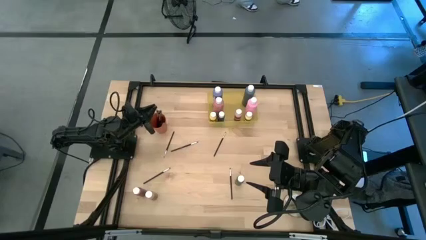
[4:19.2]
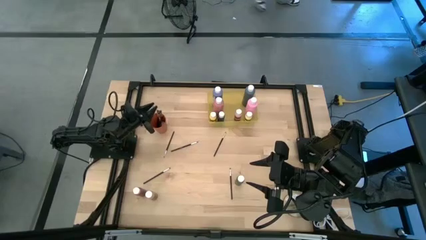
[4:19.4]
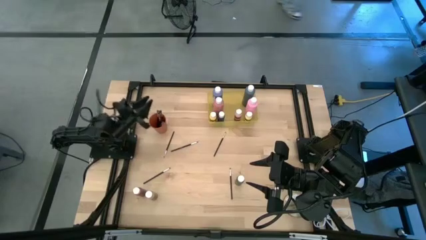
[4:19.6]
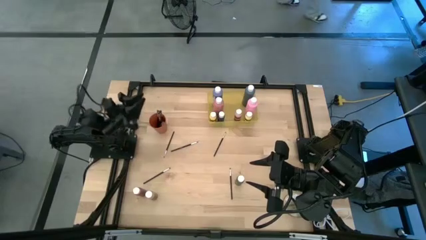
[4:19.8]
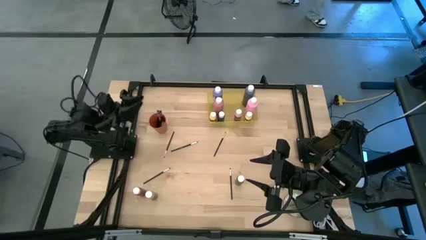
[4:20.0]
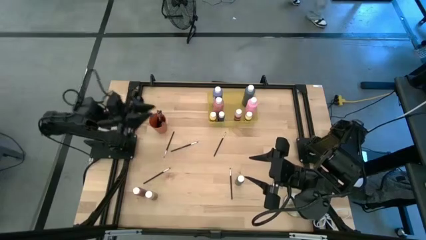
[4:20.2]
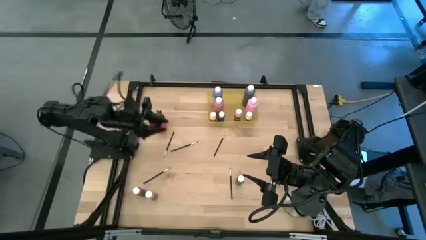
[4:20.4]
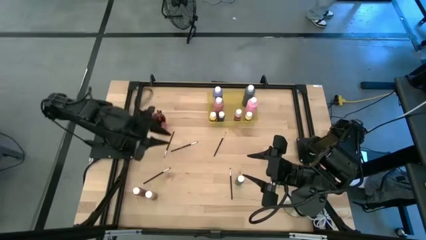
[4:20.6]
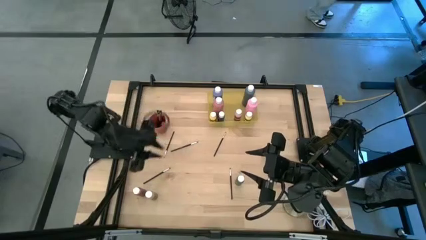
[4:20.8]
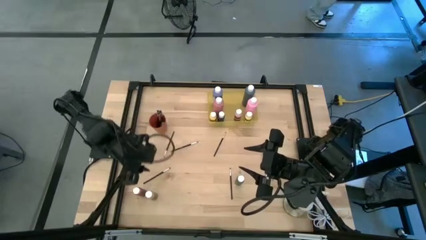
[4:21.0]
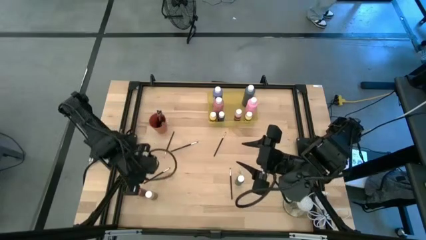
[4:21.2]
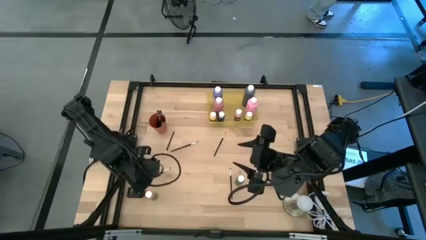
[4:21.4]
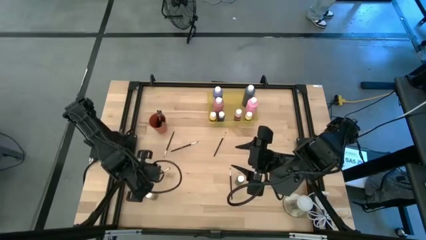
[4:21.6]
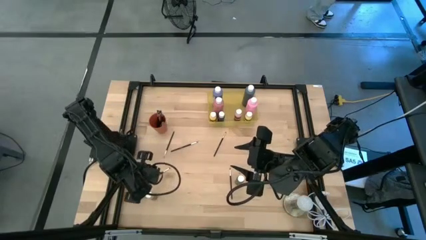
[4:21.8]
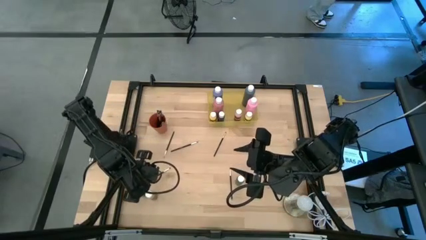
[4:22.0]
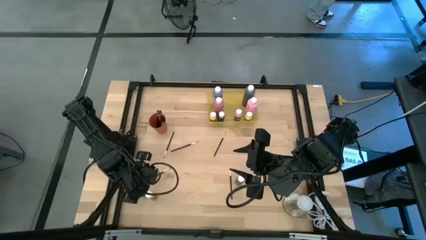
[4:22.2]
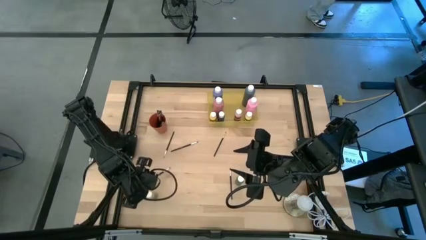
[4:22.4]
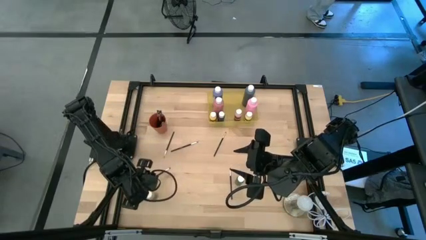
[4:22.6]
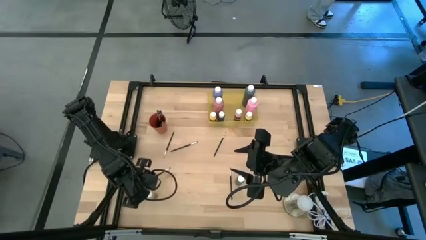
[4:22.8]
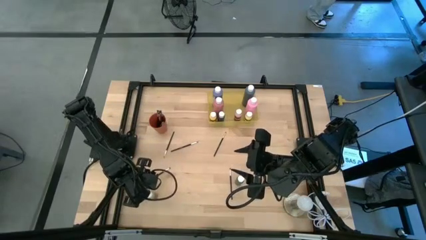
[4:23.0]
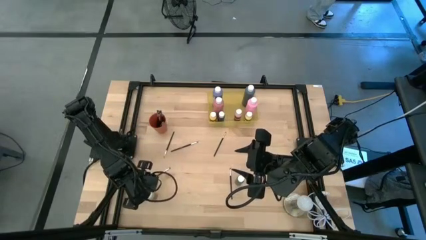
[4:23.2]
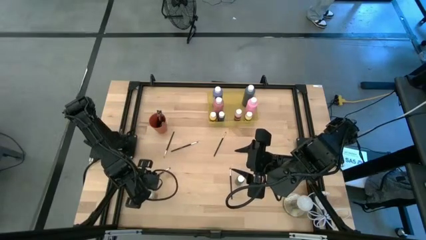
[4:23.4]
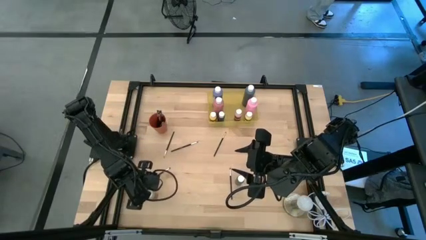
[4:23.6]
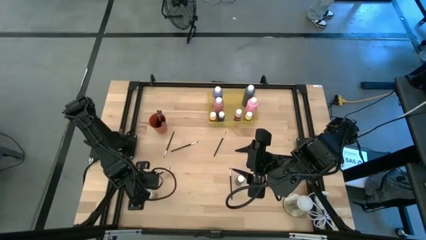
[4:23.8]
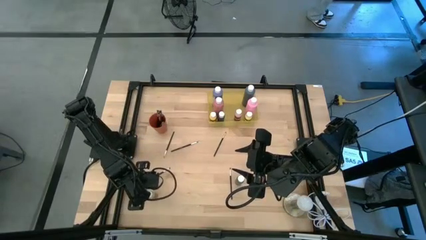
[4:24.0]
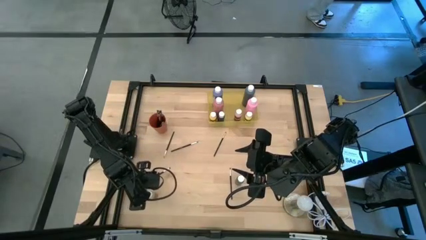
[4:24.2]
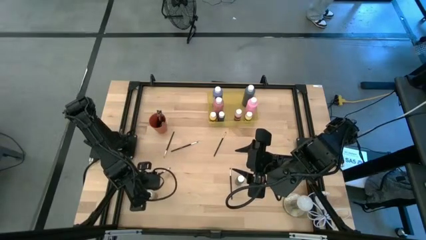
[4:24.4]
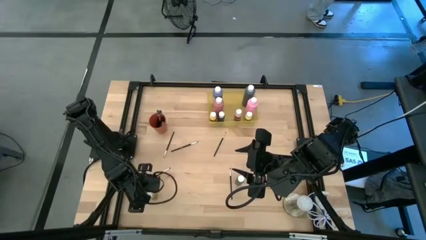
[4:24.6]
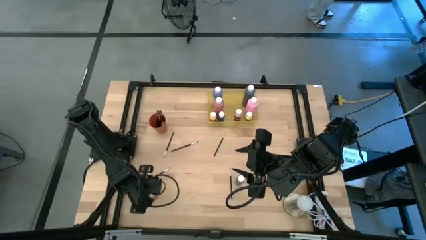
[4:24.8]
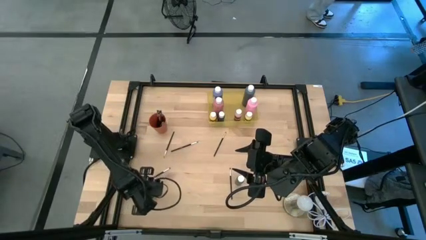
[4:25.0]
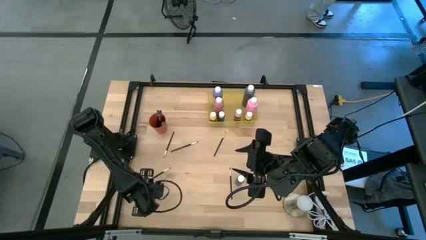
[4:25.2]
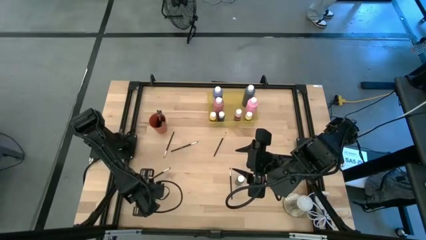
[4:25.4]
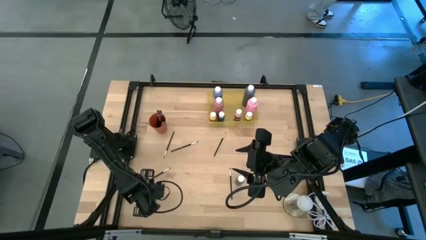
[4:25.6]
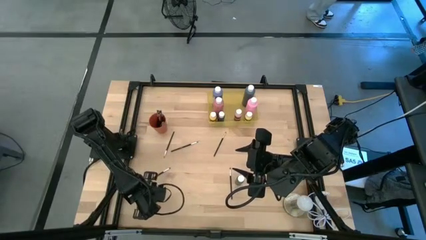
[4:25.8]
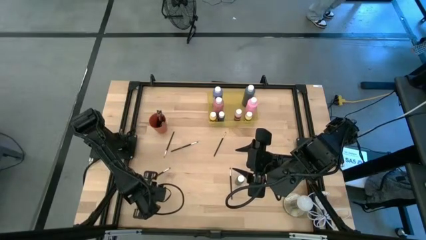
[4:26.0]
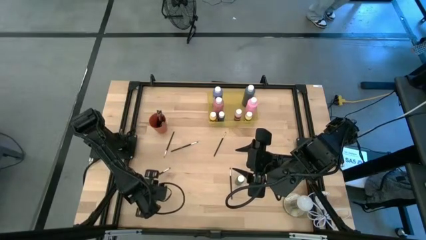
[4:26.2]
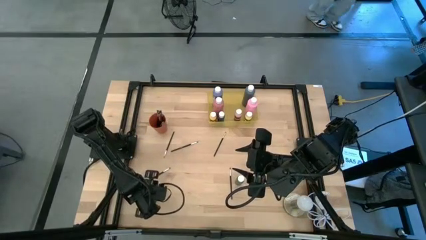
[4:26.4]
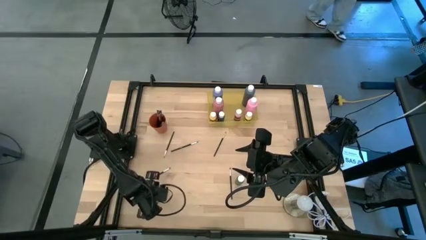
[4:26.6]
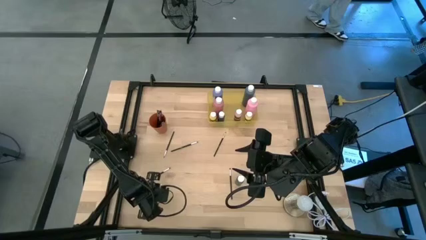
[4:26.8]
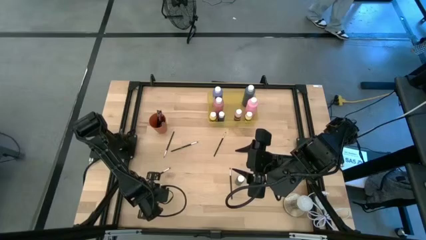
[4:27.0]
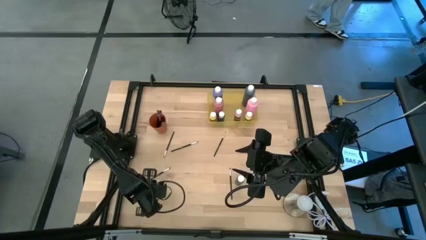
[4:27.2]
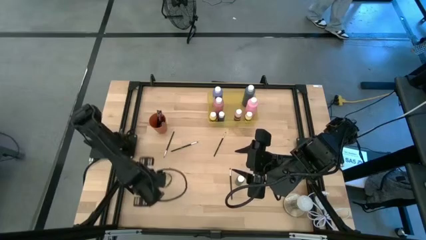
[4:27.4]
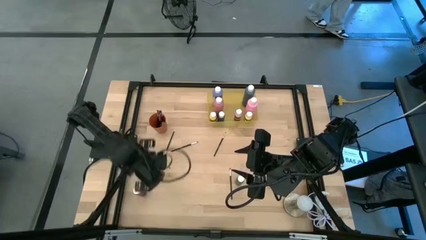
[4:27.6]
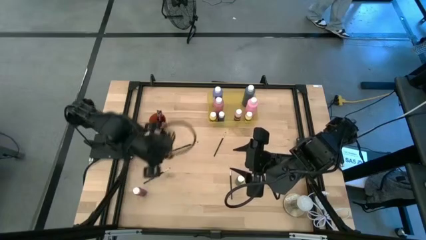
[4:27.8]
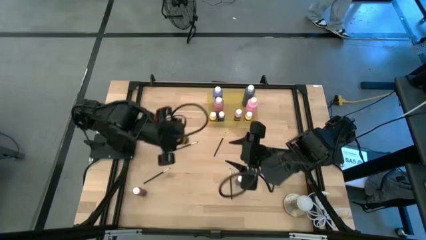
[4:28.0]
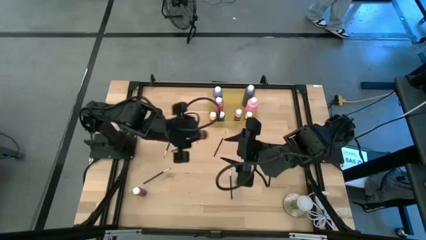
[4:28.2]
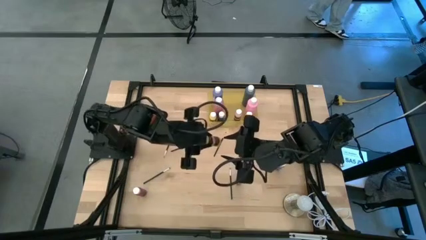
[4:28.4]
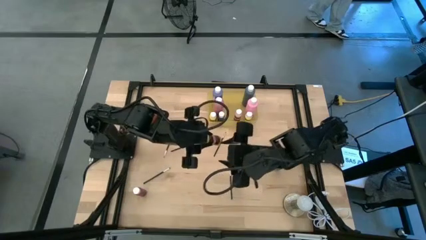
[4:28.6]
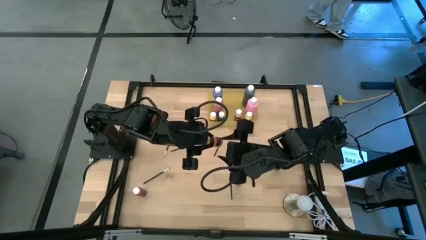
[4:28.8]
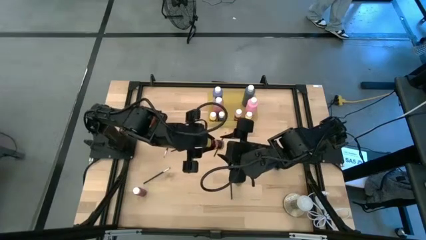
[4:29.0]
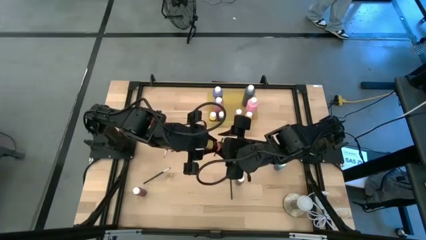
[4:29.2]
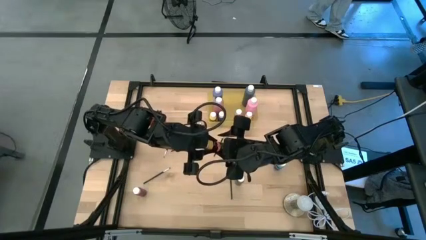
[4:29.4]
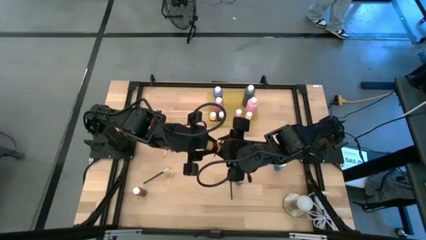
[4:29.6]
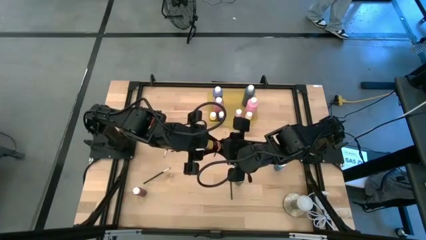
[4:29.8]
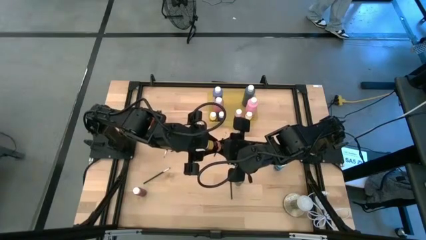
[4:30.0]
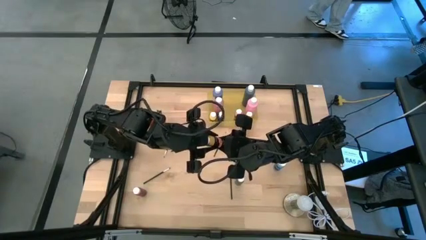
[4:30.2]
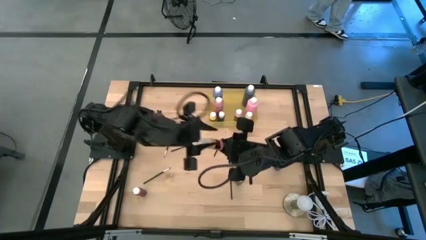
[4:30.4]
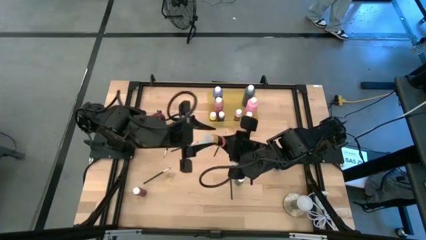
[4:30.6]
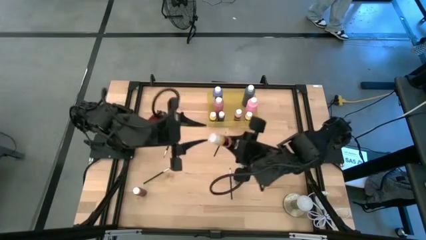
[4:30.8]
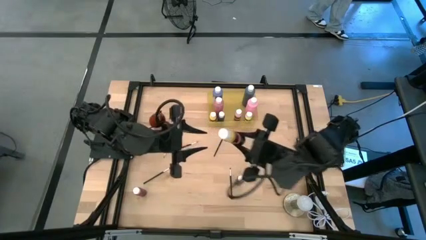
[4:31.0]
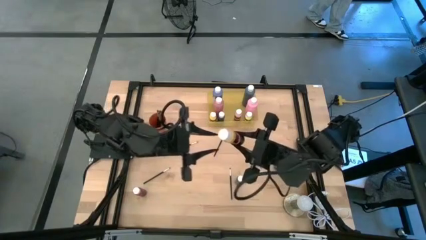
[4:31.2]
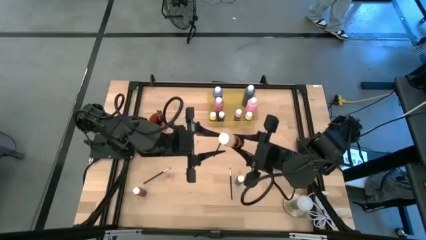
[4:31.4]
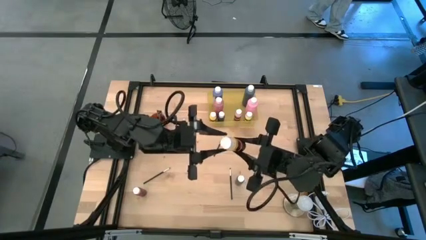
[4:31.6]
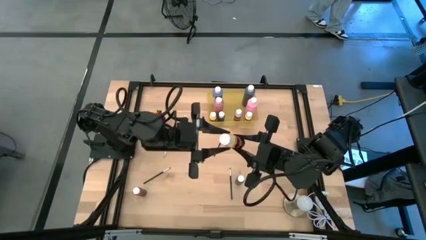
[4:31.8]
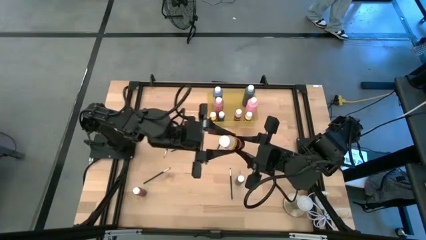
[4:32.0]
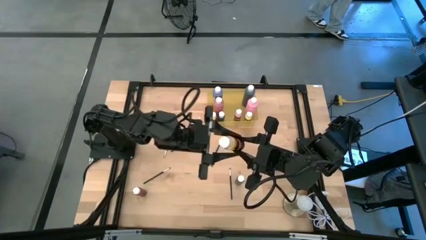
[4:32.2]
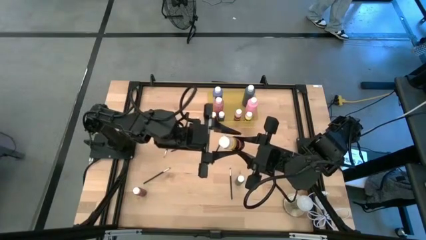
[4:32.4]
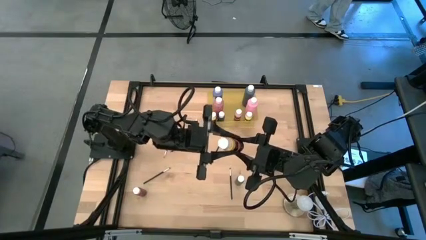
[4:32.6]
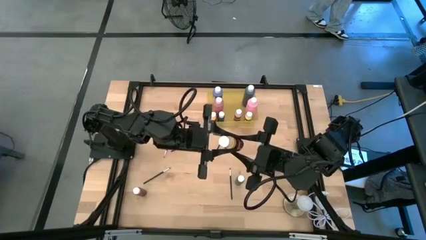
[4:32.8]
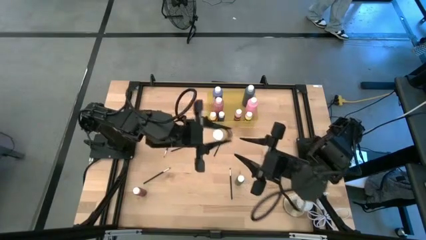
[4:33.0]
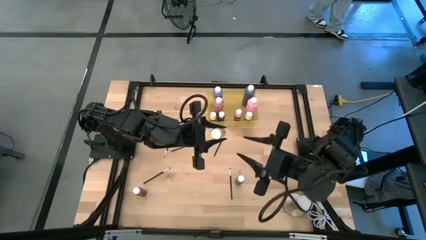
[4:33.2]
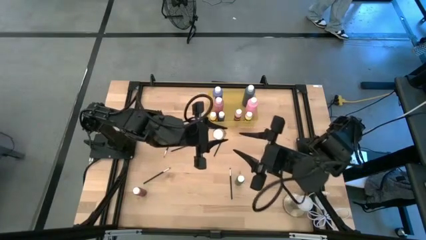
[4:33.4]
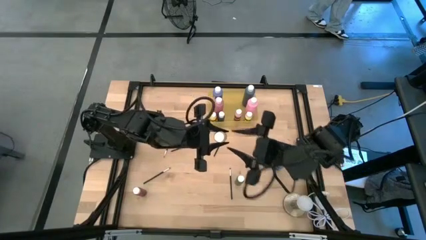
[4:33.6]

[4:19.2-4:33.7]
Task: Pick & Place Paint Supplies
Put the small yellow paint bottle into the yellow bin

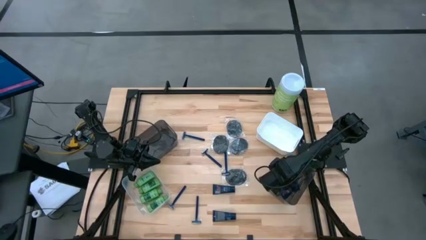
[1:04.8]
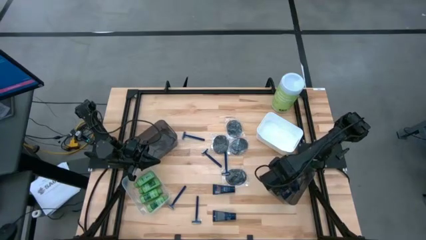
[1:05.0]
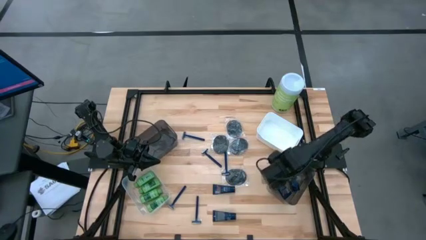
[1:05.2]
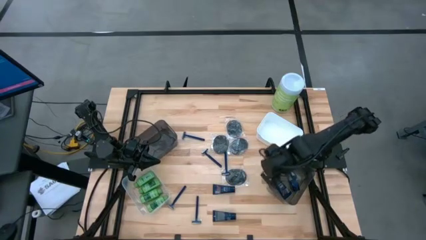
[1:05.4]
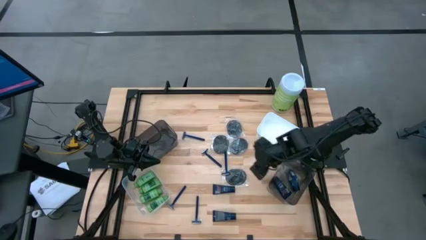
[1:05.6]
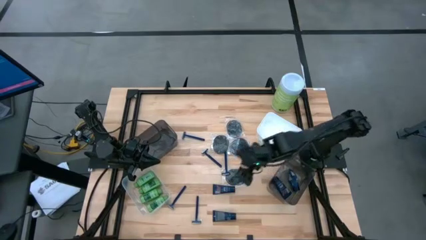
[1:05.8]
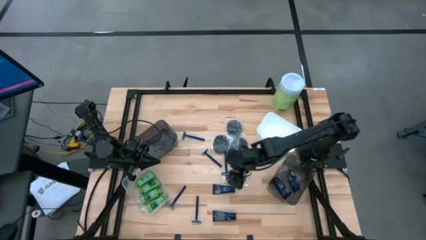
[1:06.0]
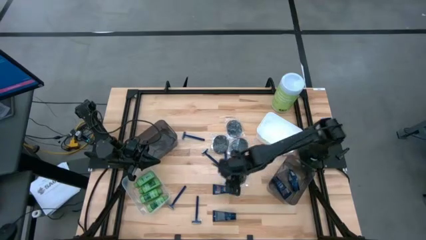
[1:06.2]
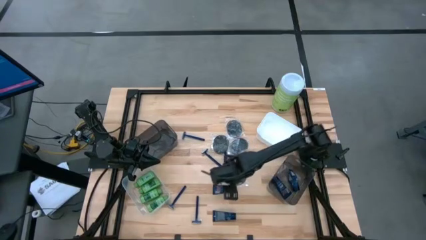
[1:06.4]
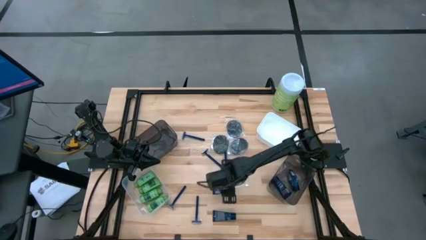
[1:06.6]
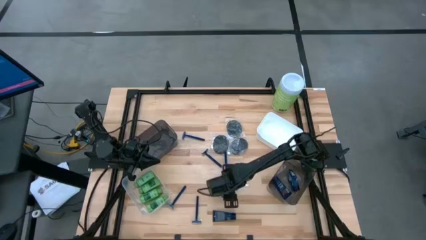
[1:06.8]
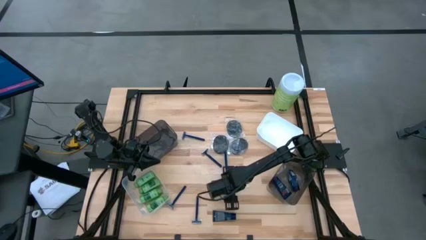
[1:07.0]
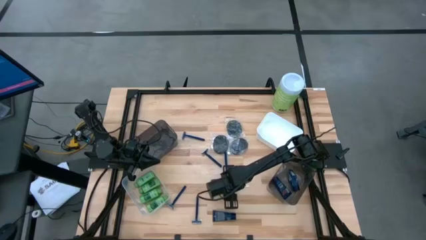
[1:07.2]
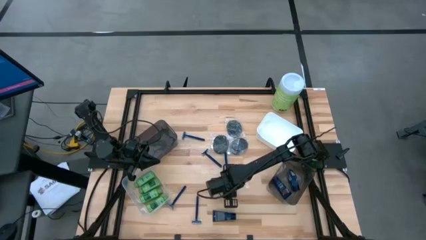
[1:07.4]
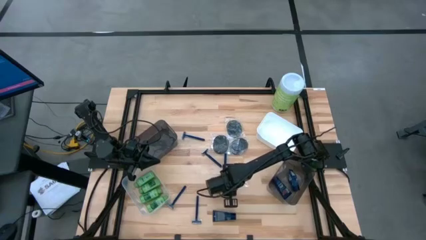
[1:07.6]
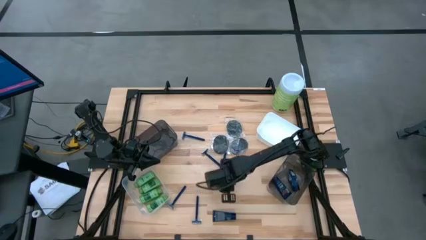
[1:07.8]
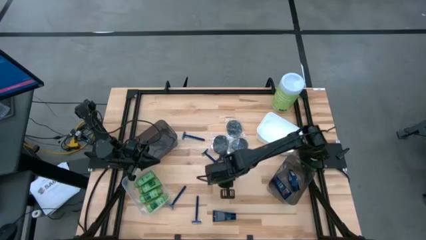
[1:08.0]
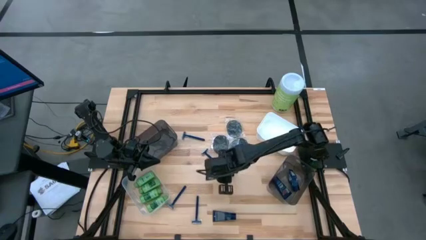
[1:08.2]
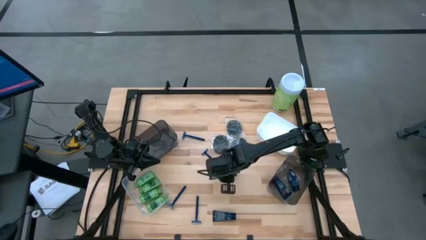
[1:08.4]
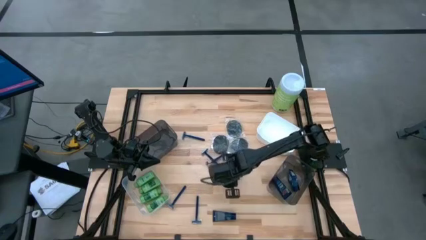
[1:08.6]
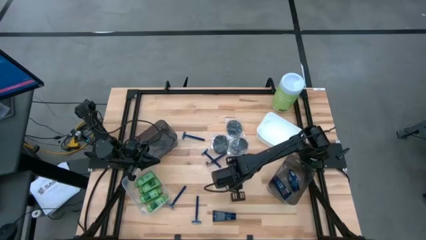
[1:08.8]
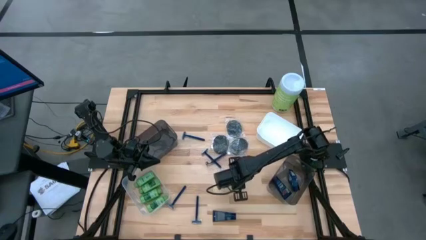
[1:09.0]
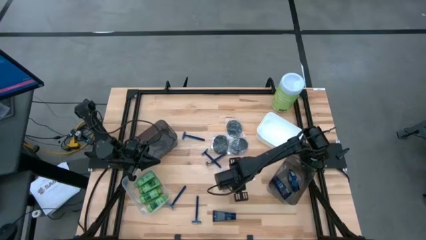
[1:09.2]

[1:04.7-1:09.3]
Task: Pick & Place Travel size toiletries
Put the blue shave cream into the right black bin
